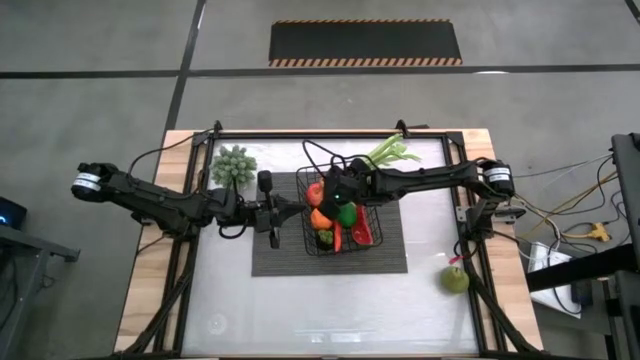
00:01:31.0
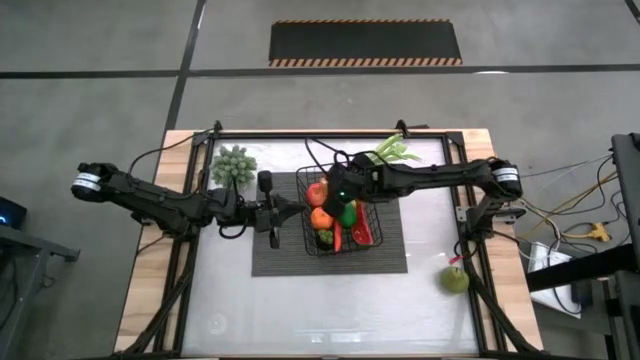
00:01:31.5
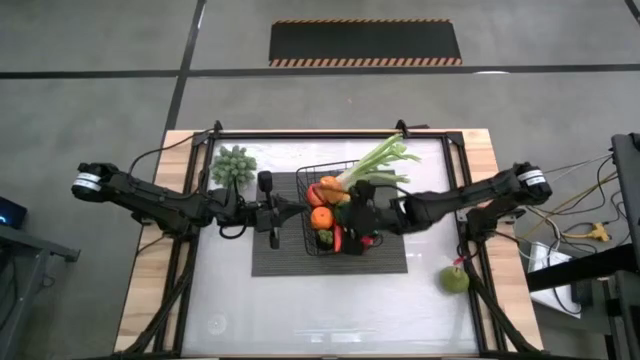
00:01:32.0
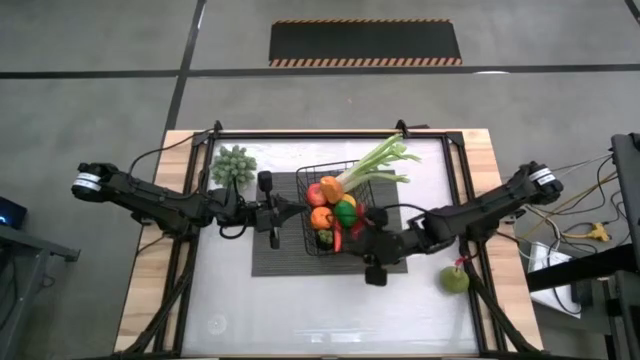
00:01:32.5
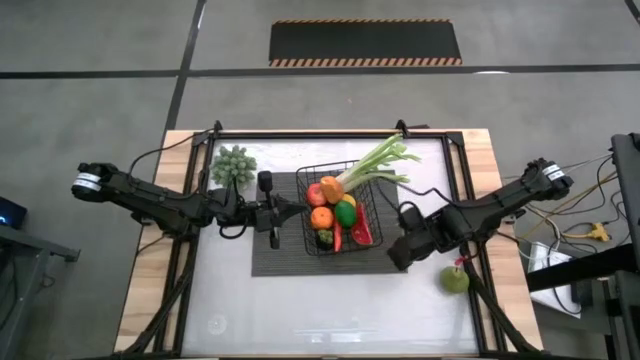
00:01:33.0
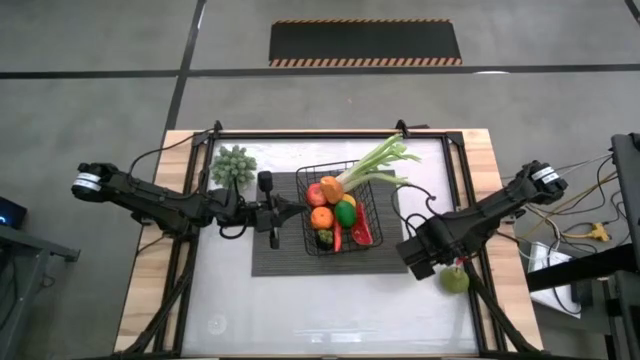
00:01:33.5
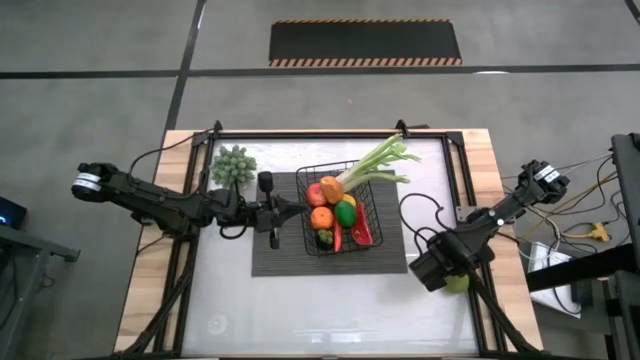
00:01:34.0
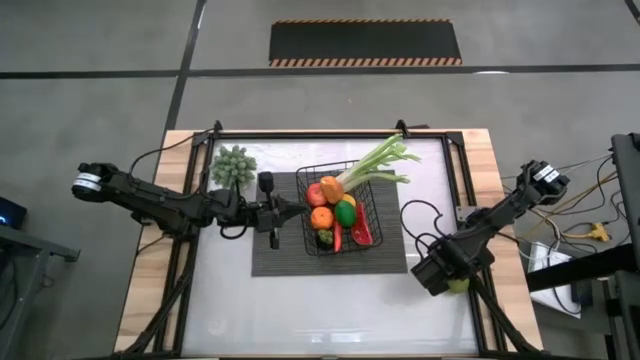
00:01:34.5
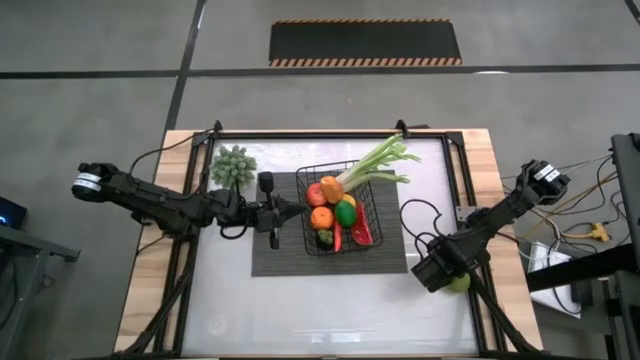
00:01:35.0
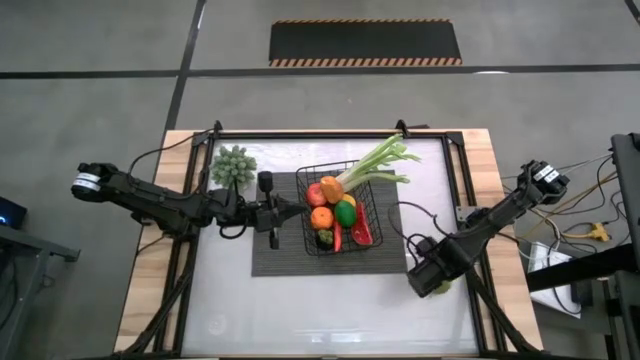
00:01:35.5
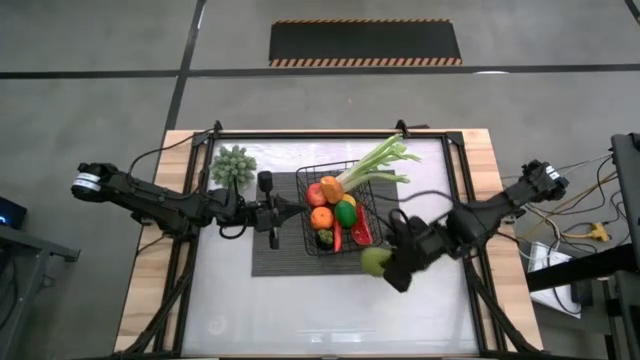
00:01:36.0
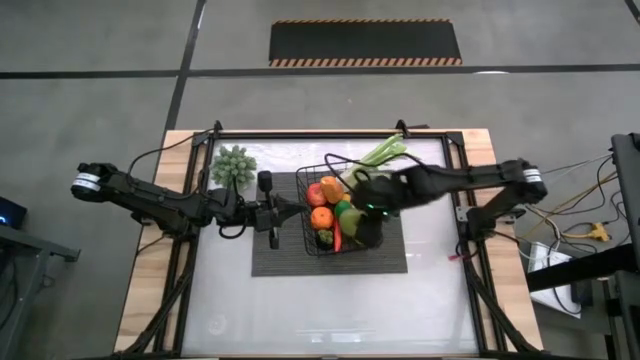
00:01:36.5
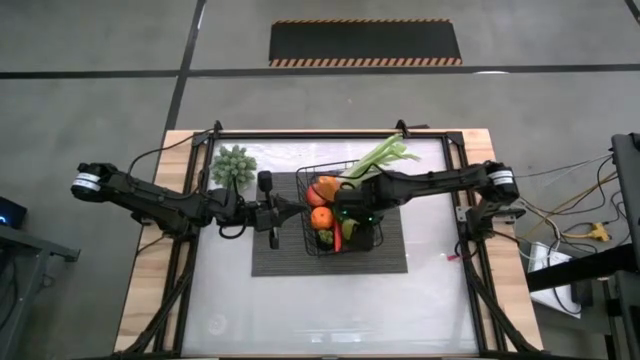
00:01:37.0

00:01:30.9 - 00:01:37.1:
Task: Build produce basket
Put the pear into the wire basket

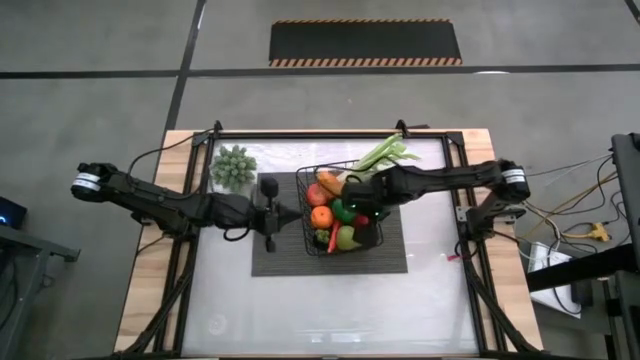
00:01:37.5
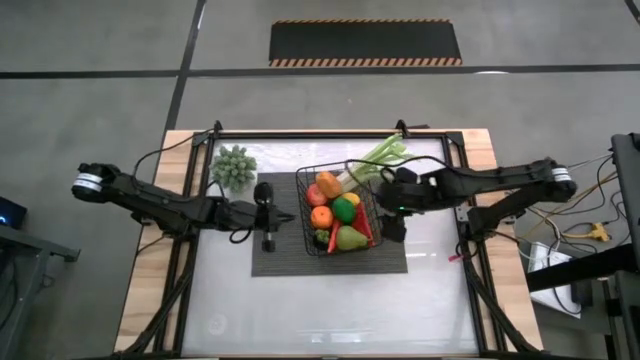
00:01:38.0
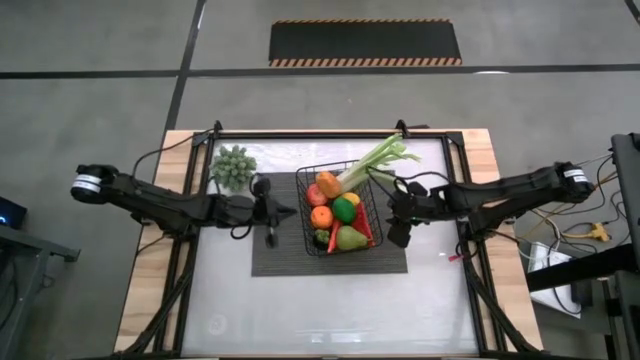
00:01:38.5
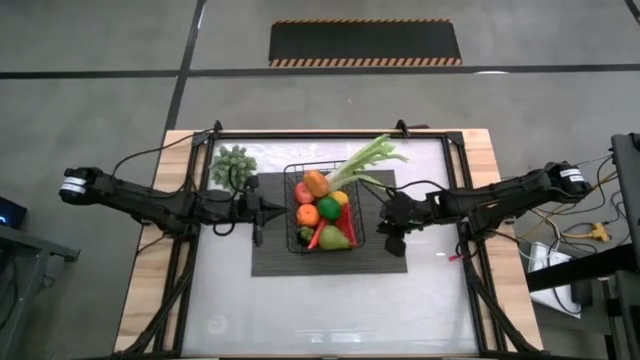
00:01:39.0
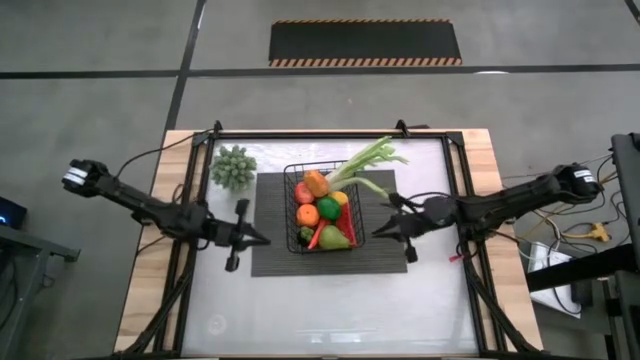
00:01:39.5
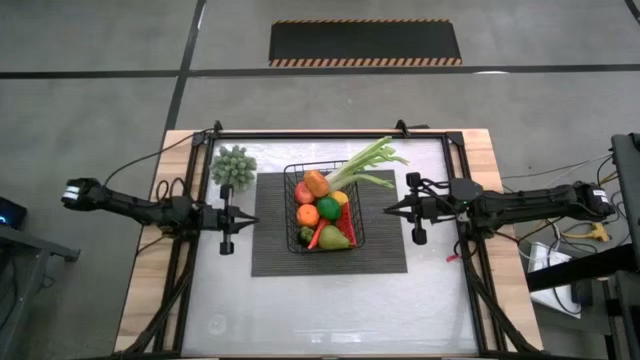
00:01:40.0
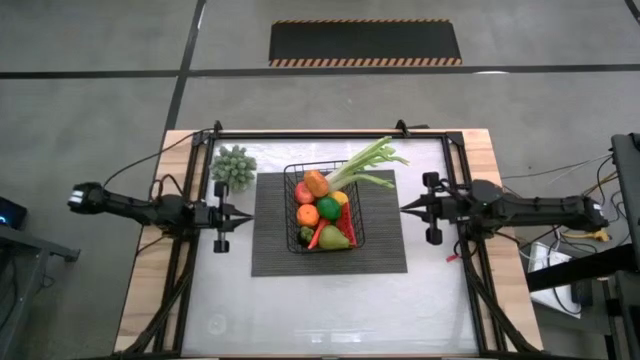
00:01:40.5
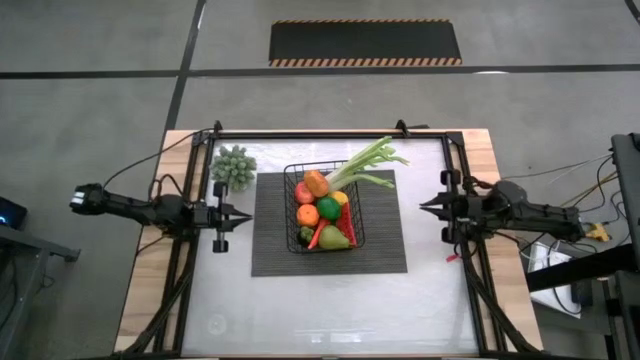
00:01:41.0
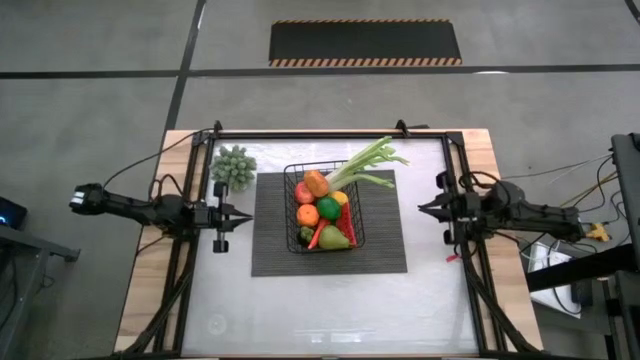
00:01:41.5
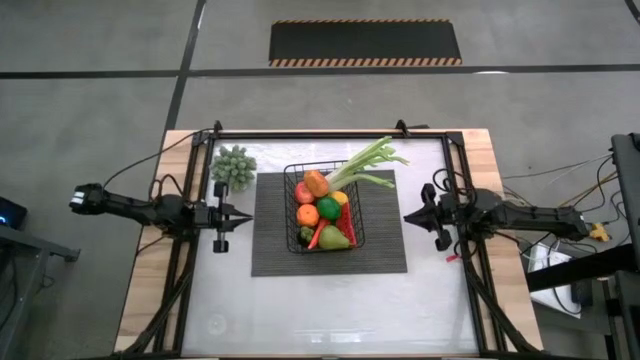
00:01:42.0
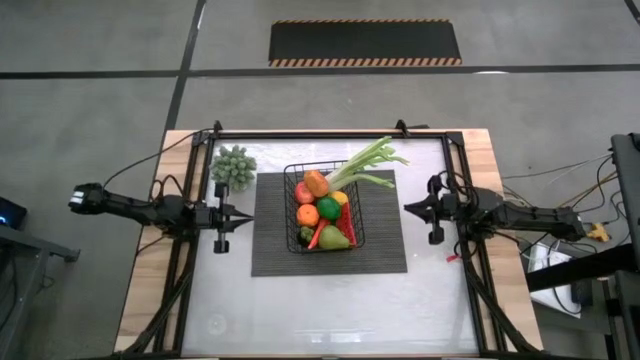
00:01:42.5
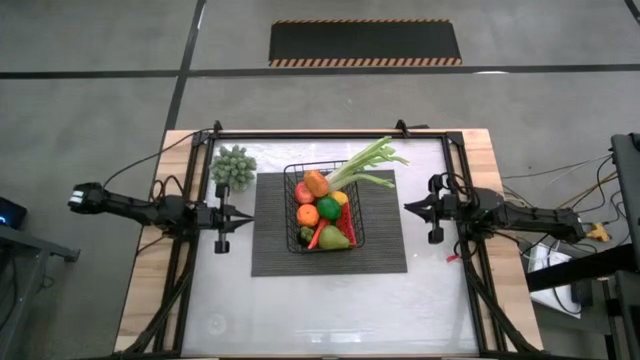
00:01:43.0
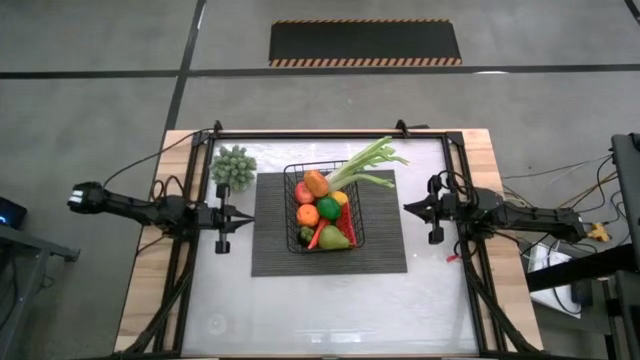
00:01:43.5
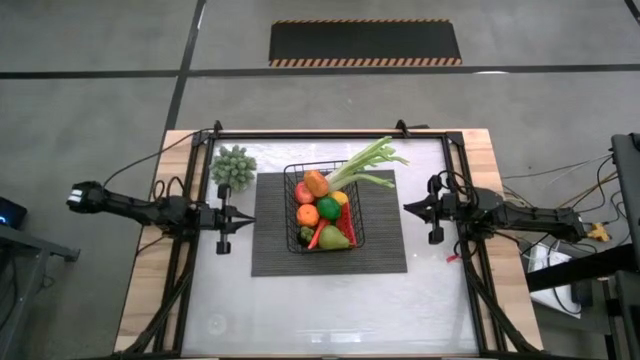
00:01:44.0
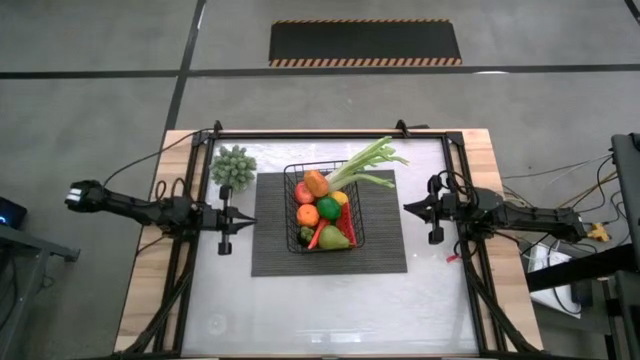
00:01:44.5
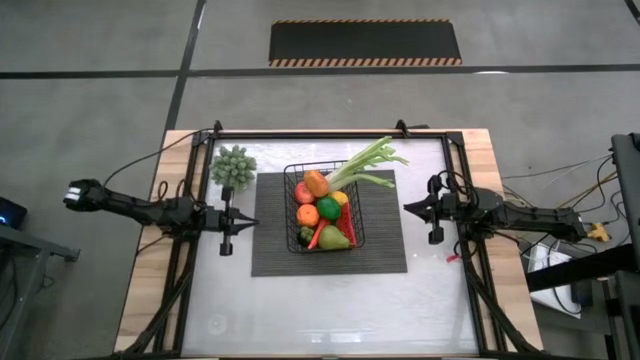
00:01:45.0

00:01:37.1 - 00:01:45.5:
Return to Home Position

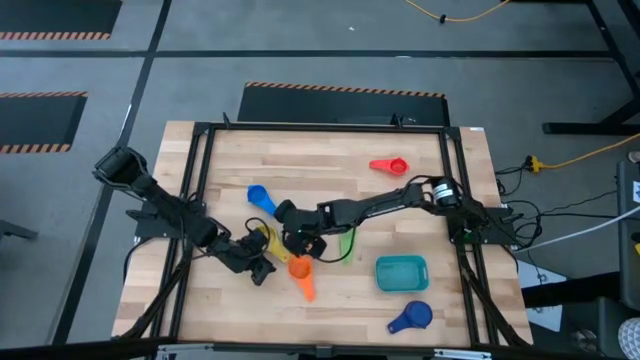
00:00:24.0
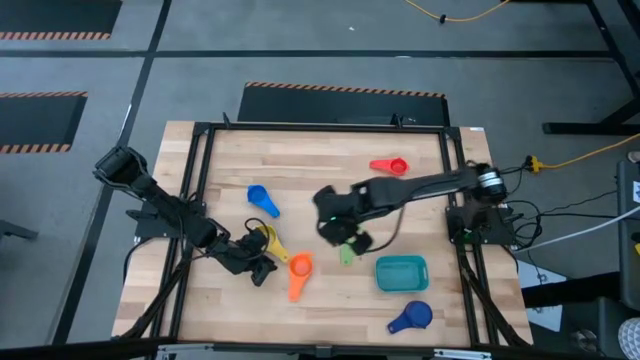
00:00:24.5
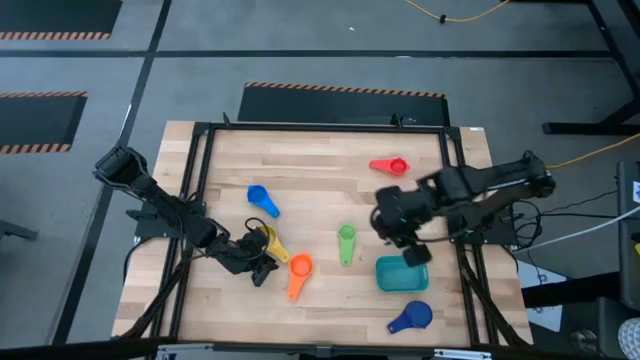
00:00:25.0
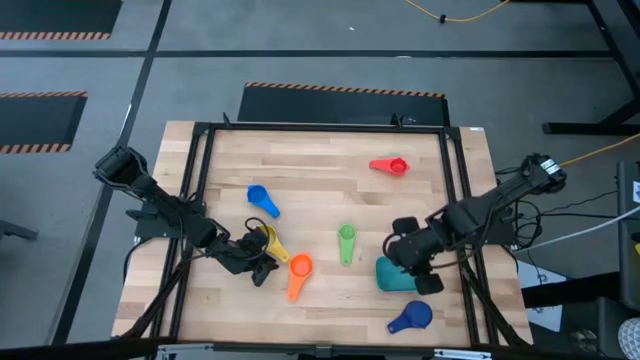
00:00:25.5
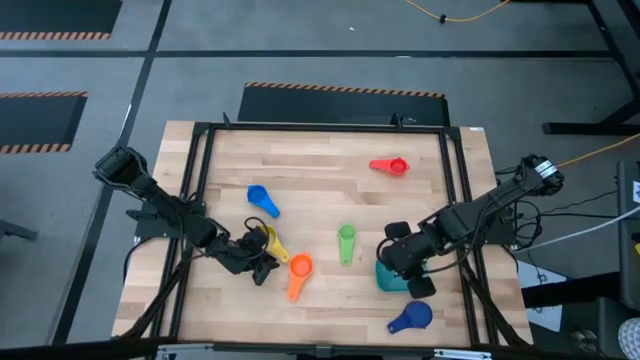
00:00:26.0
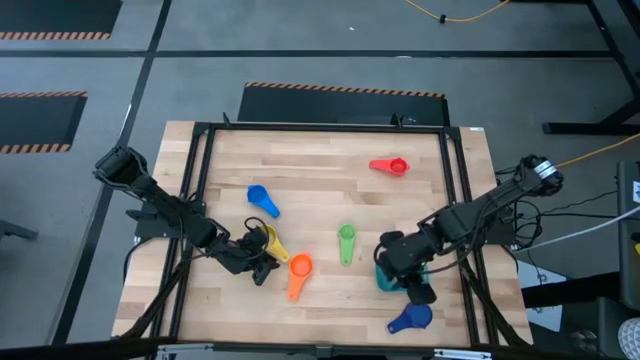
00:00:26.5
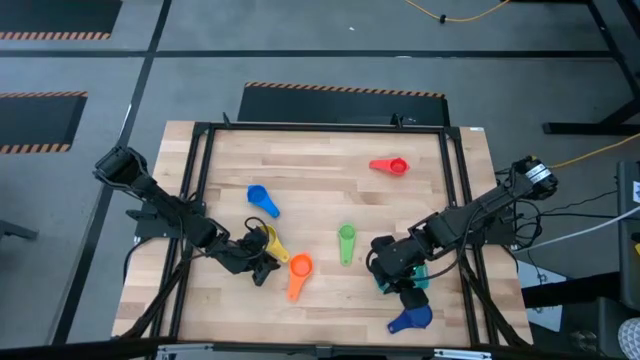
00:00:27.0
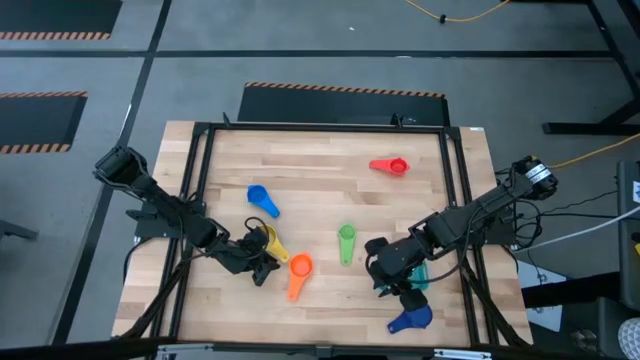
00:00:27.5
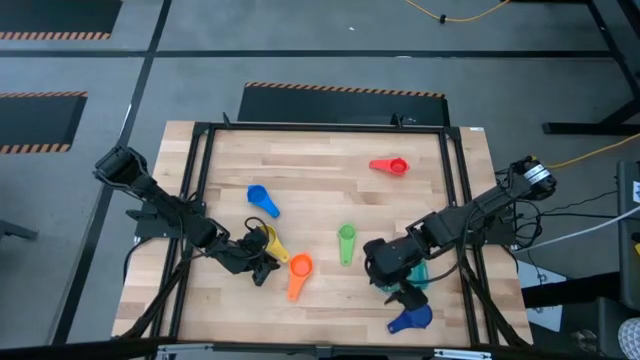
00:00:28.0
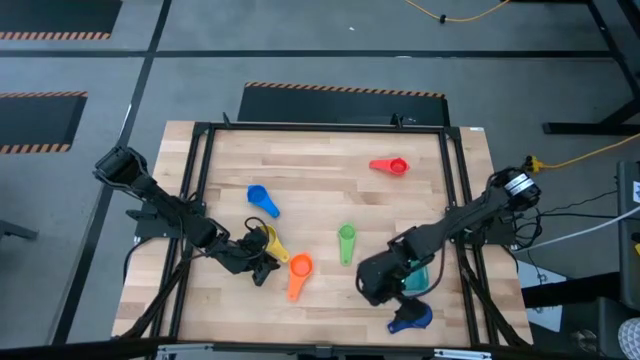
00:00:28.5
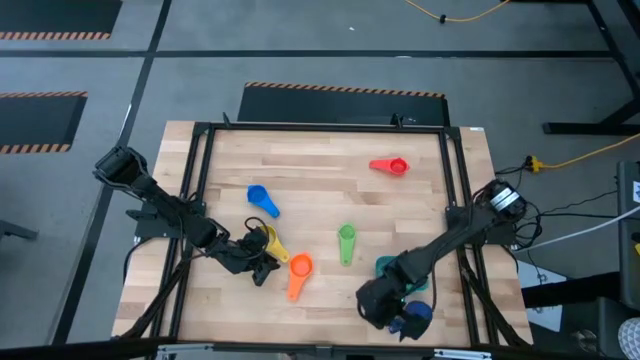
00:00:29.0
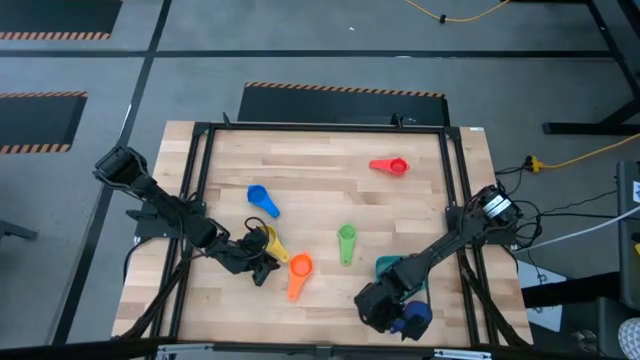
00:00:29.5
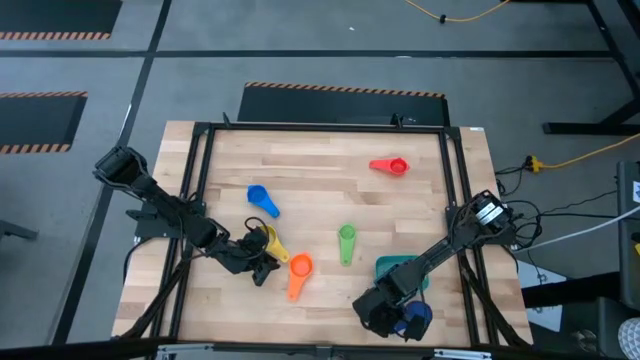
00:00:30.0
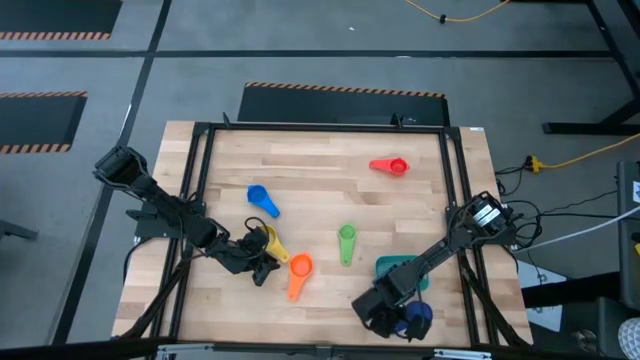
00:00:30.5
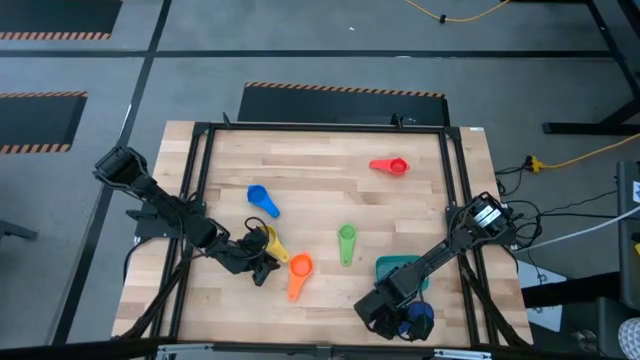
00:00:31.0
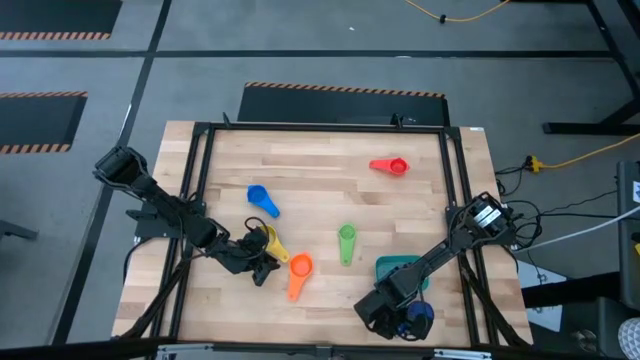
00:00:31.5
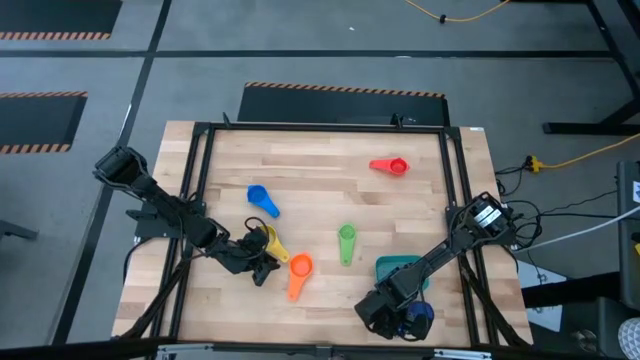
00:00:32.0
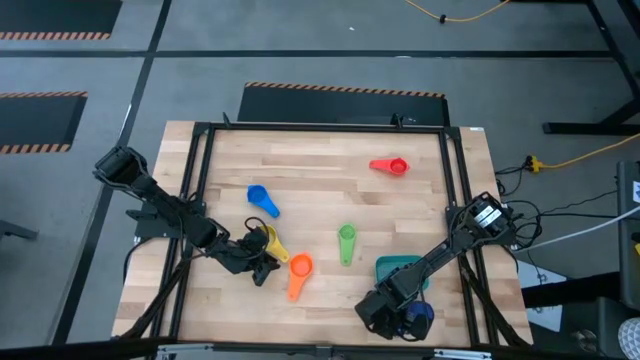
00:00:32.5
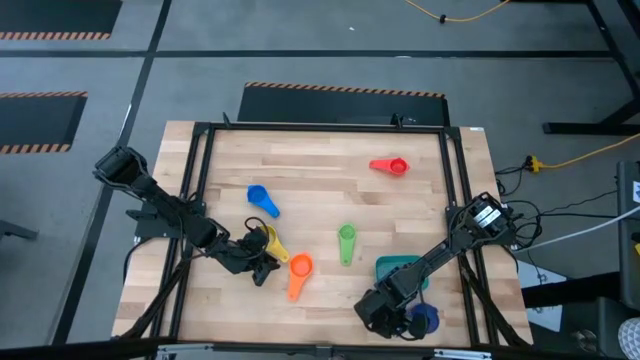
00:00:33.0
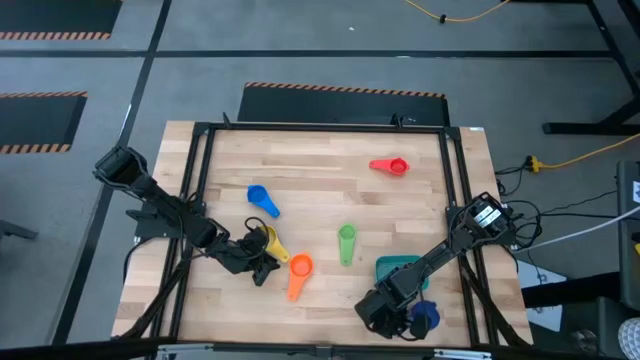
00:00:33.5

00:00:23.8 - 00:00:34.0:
Task: Nest measuring cups in basket
Stack the dark blue measuring nest cup into the yellow measuring nest cup
